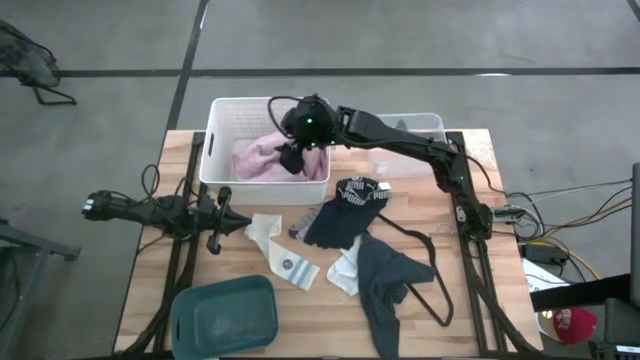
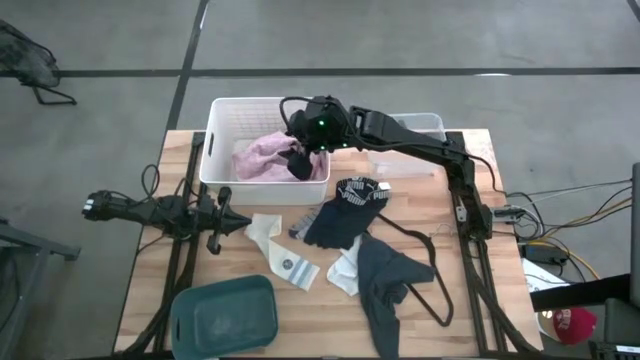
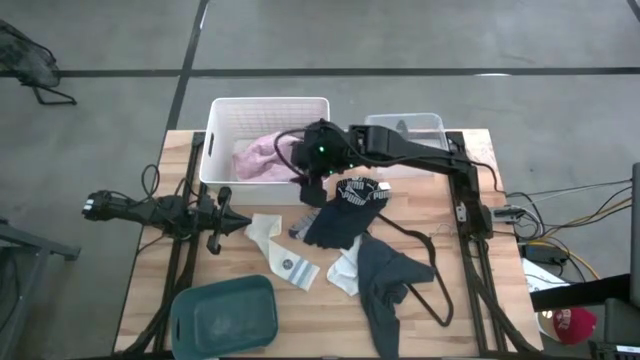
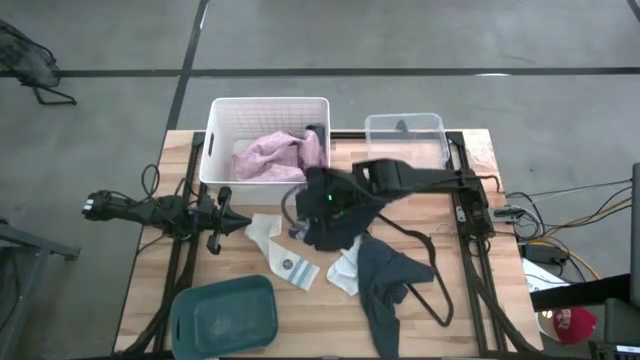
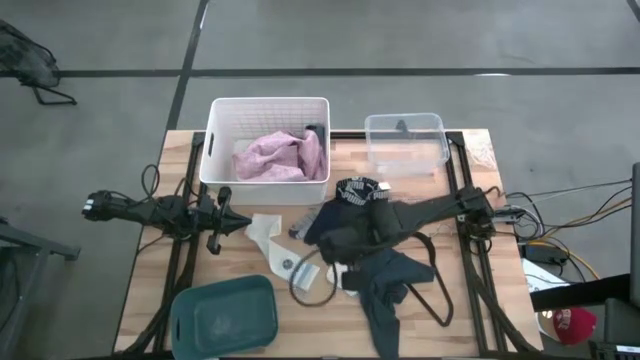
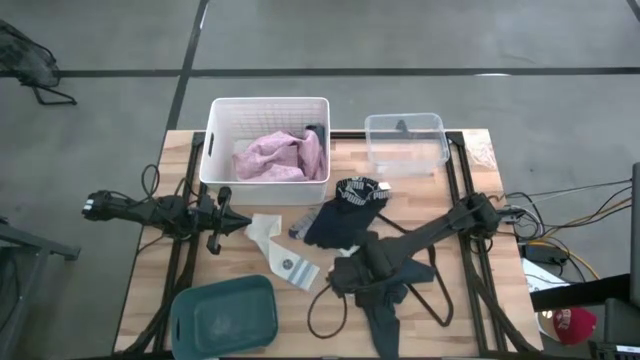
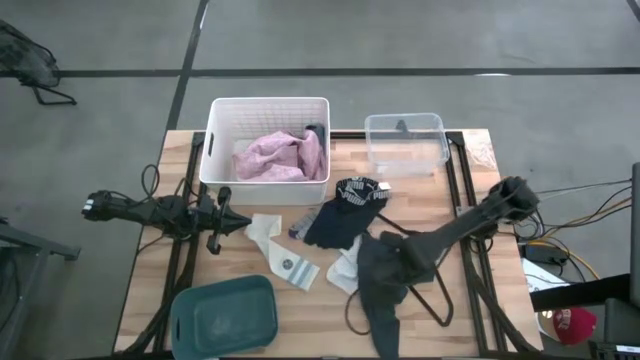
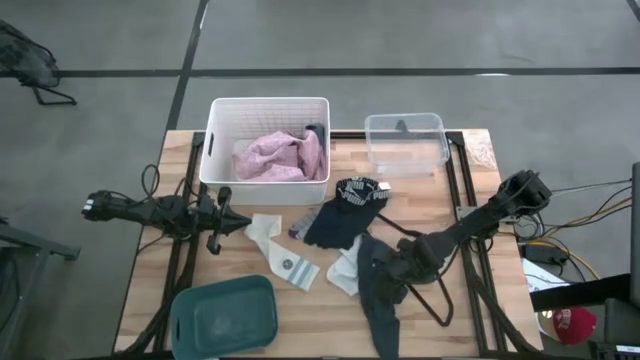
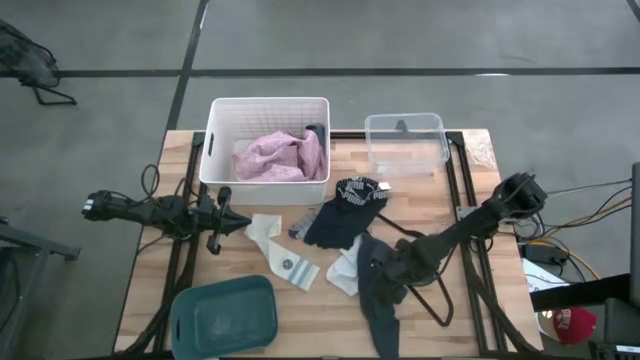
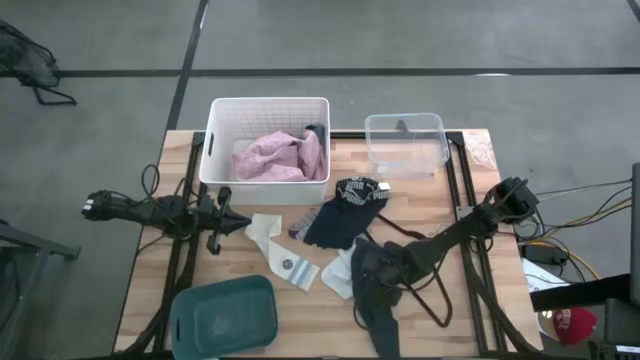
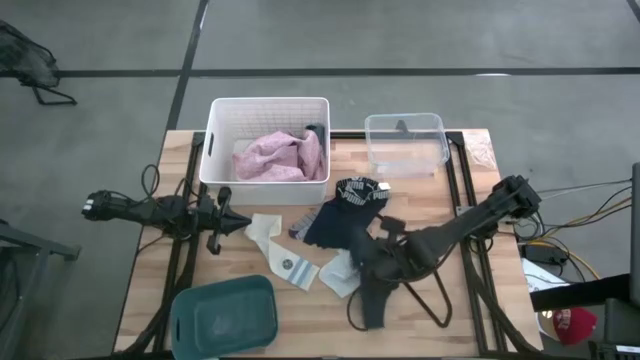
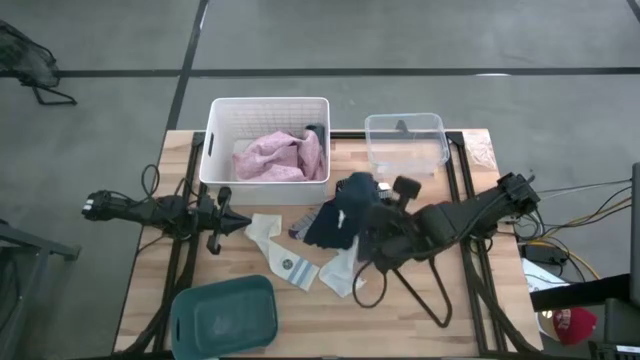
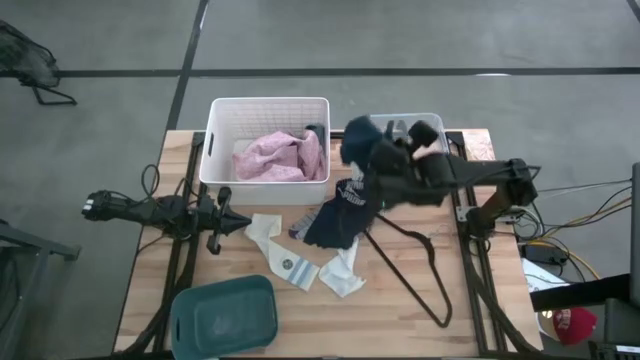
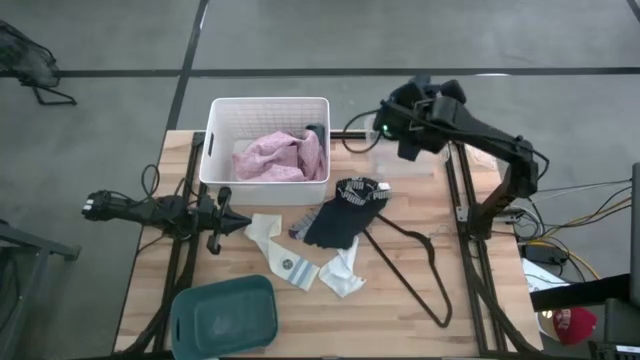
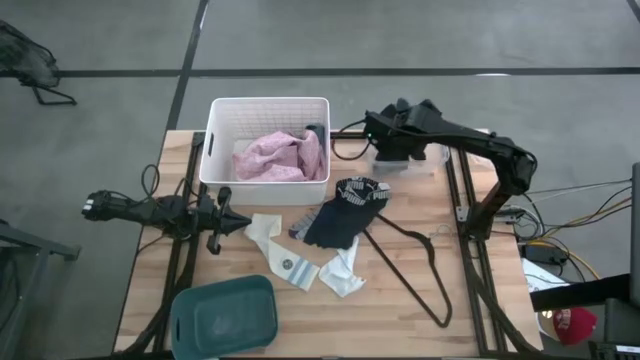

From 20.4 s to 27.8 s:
Task: Pick & Place Cloths
Put the blue underwear in the transparent bin

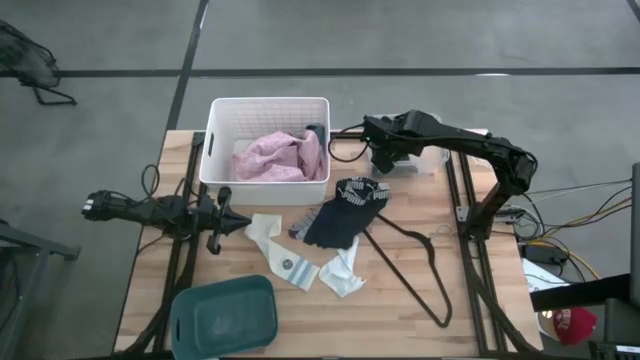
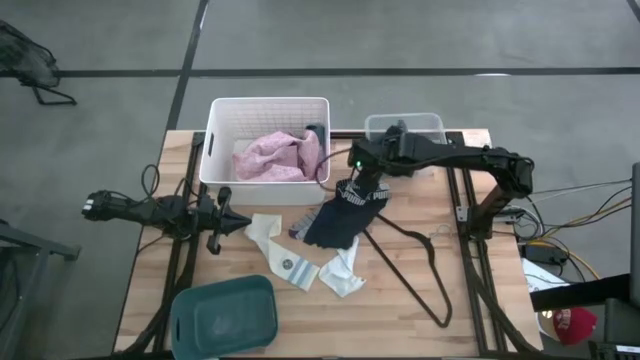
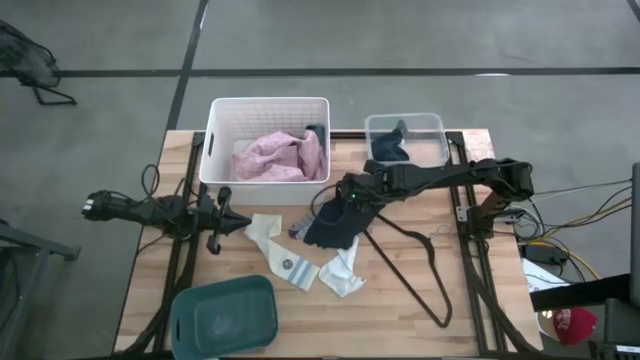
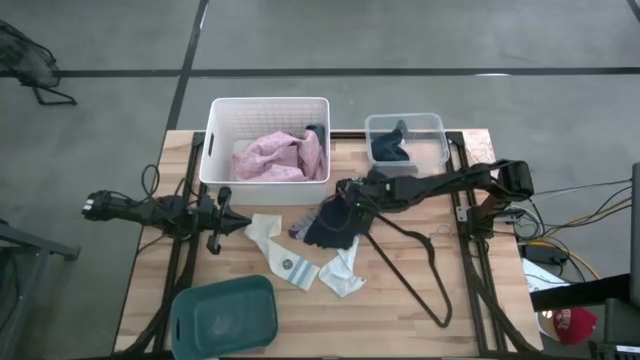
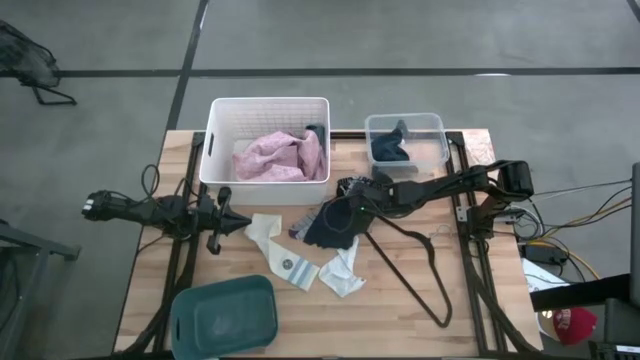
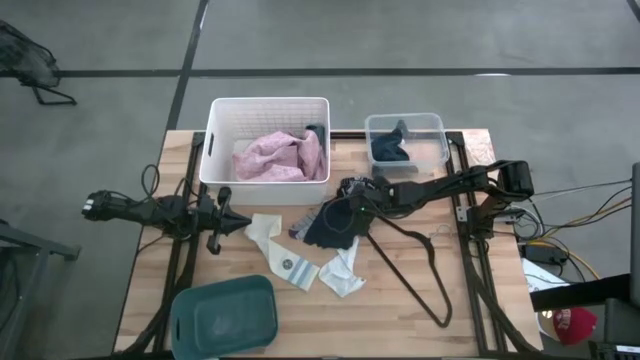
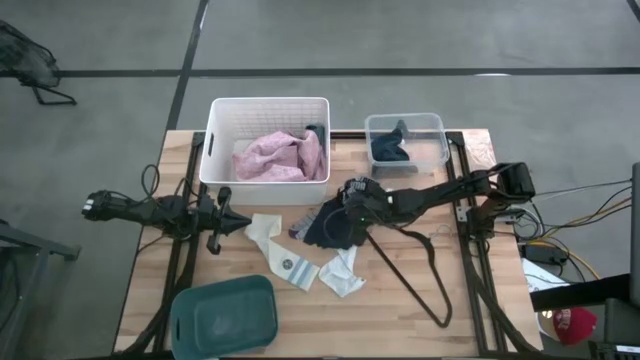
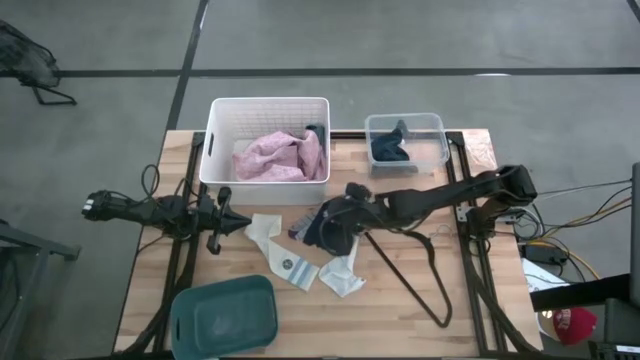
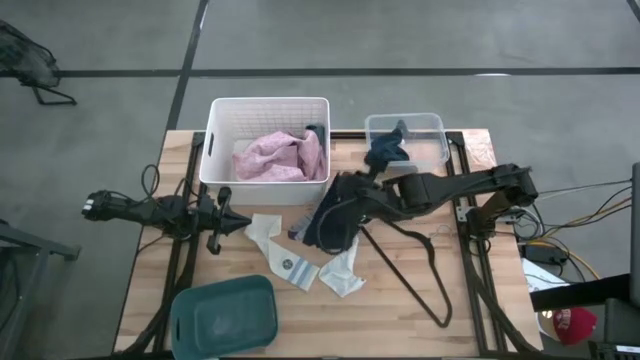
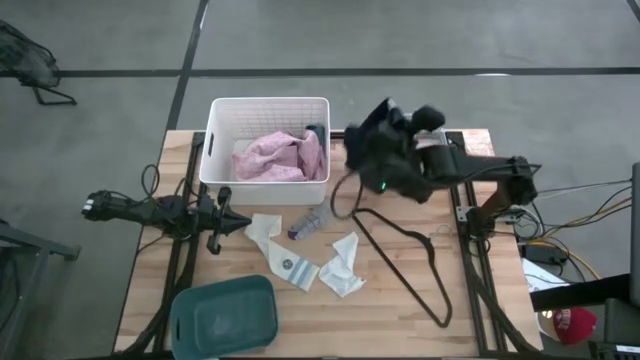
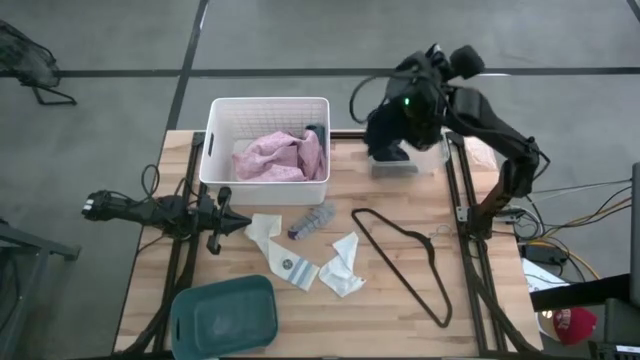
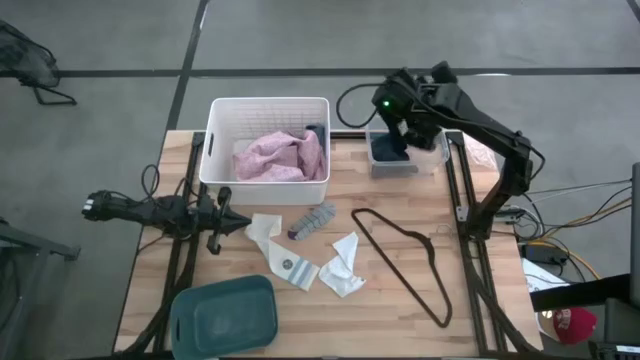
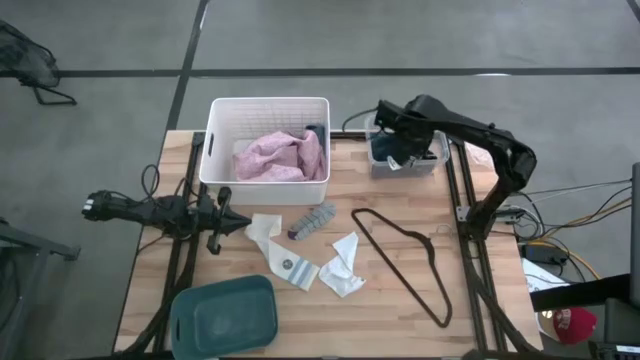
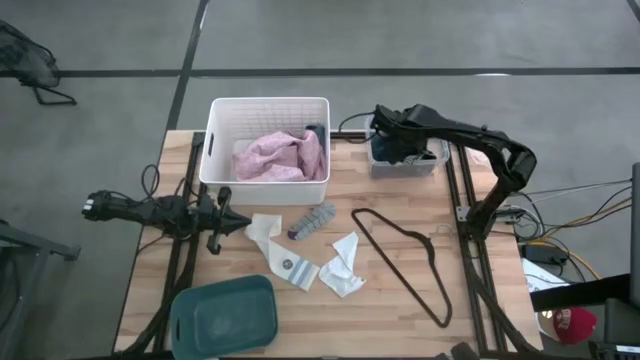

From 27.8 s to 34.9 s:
Put the black underwear in the transparent bin

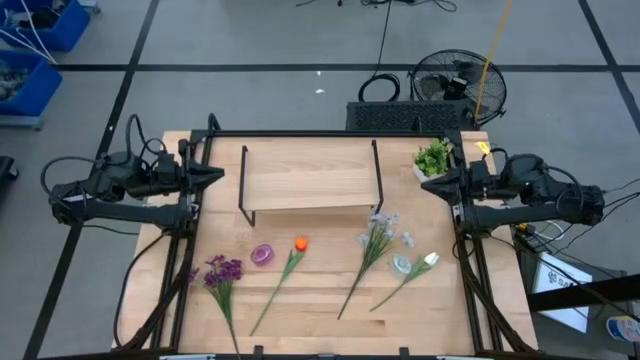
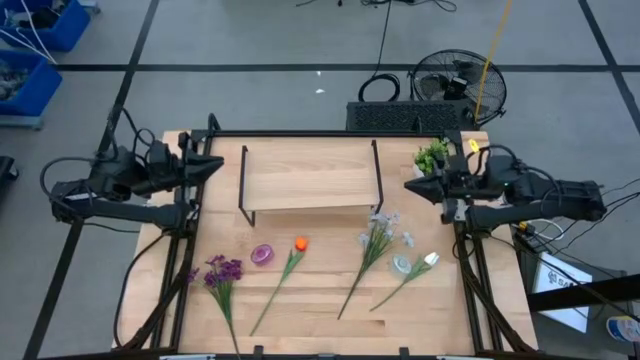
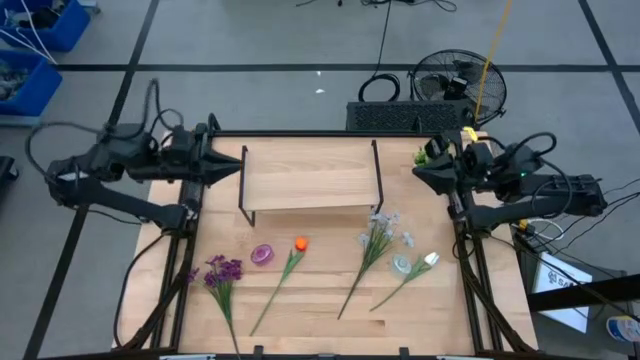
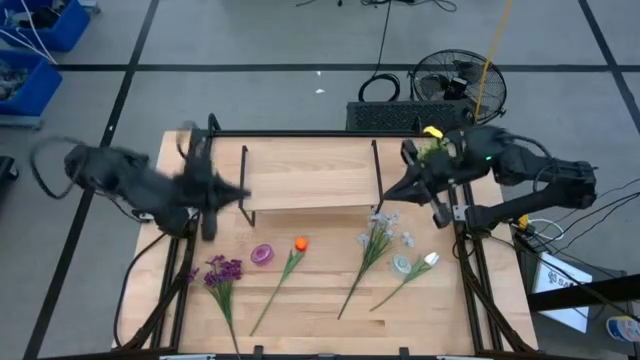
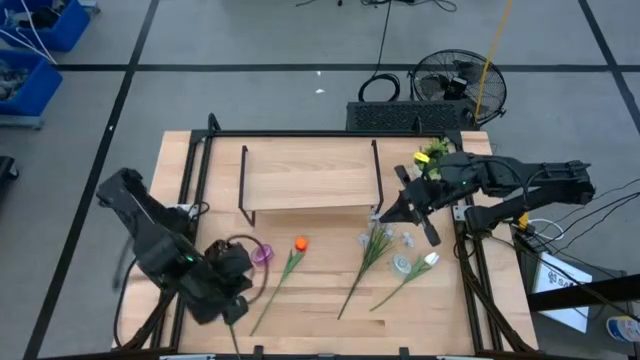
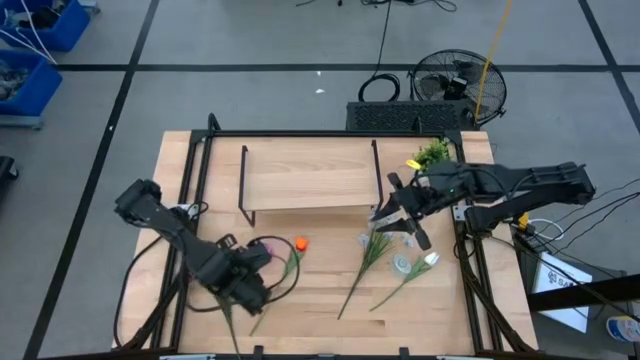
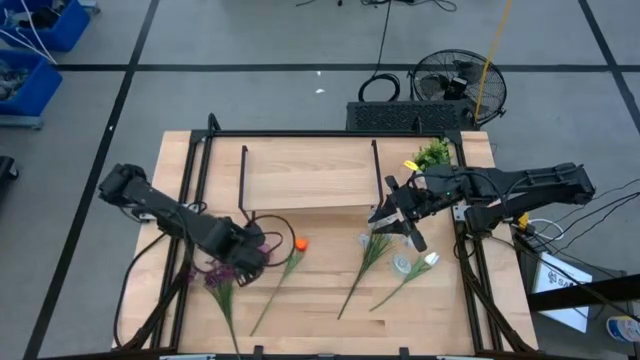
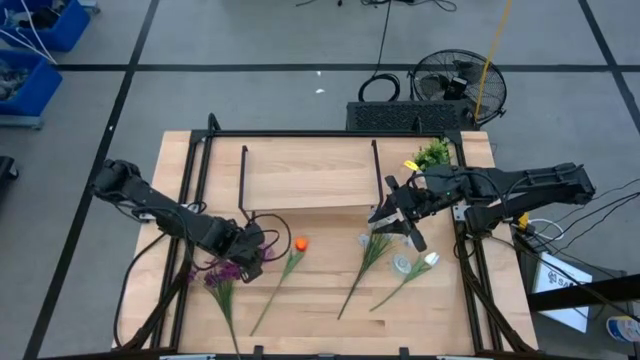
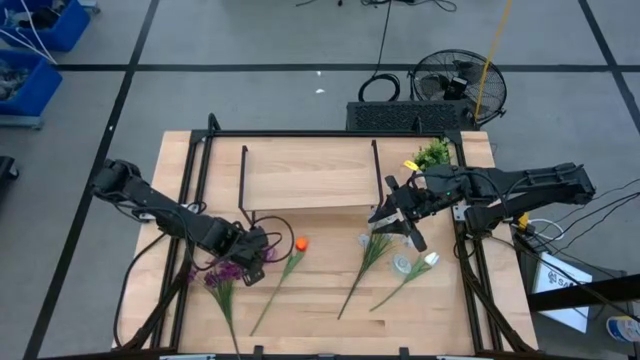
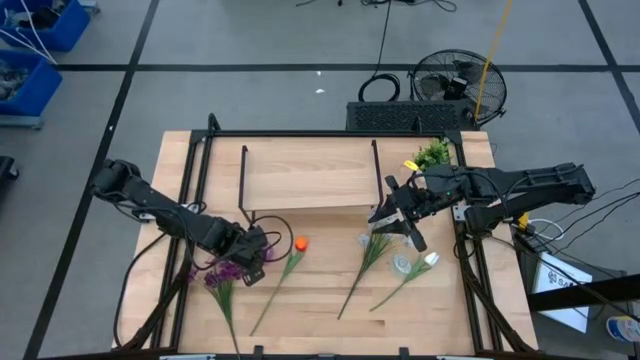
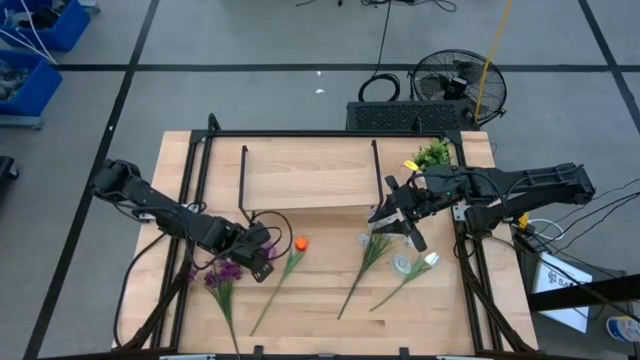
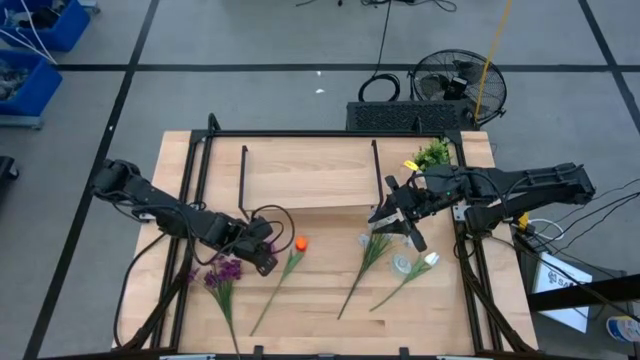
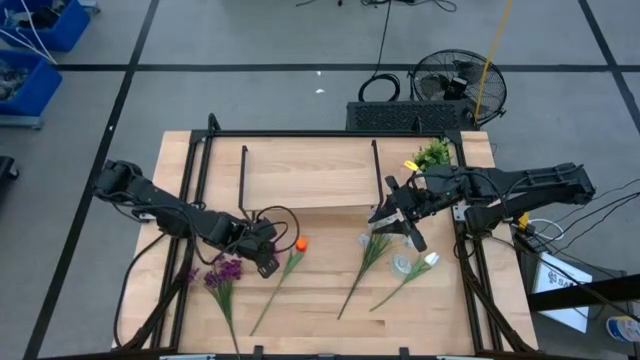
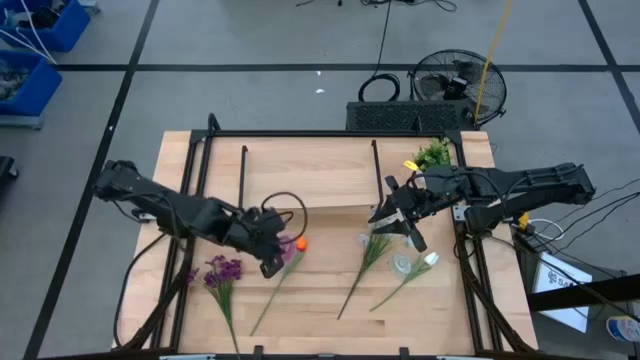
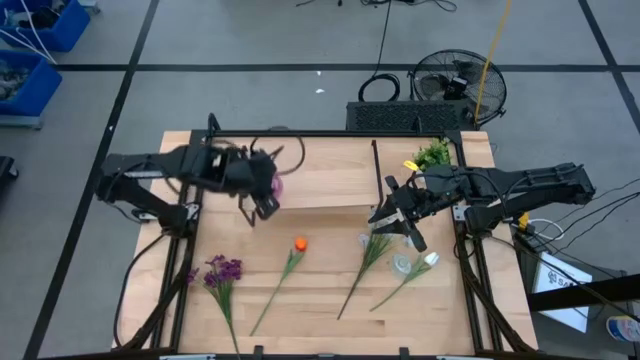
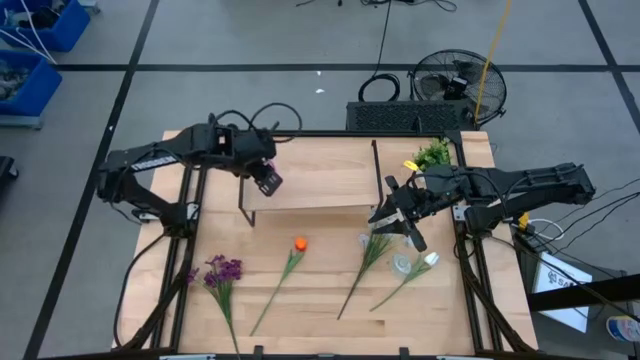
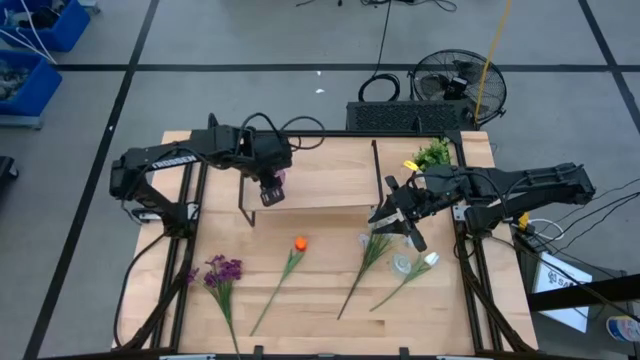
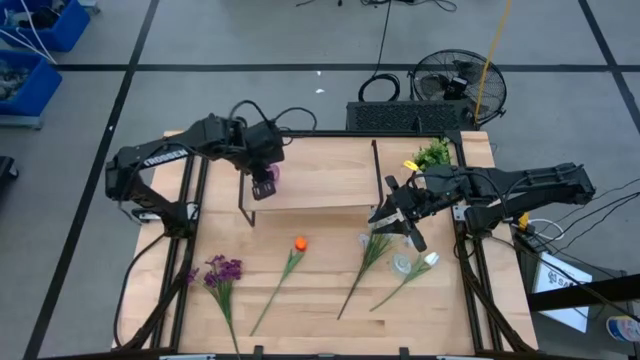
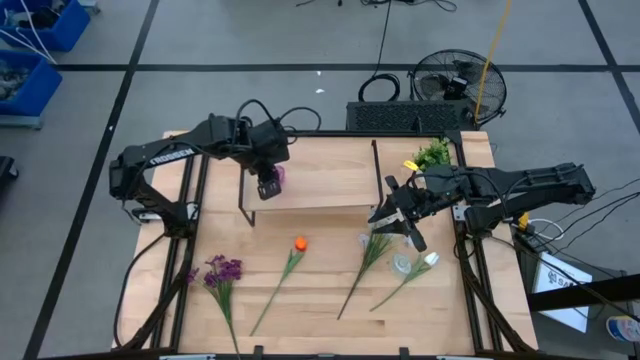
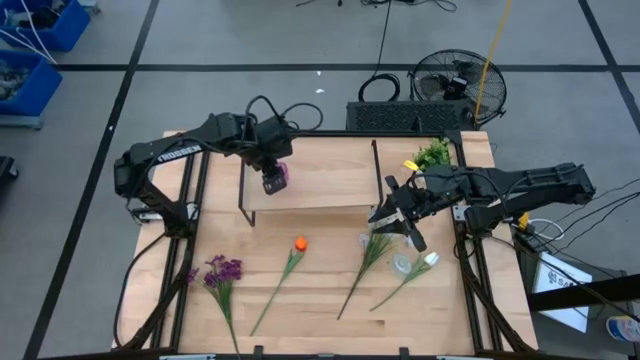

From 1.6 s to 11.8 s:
Task: Pick and place flowers into a vace then onto a shelf
Put the violet vase on the shelf
